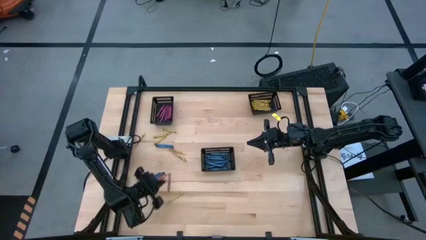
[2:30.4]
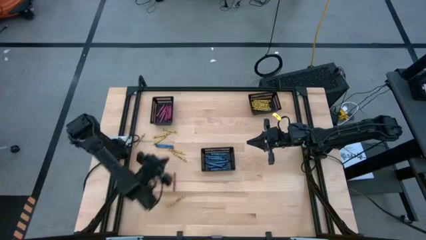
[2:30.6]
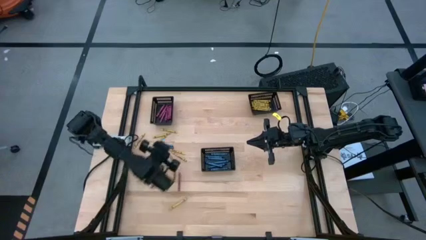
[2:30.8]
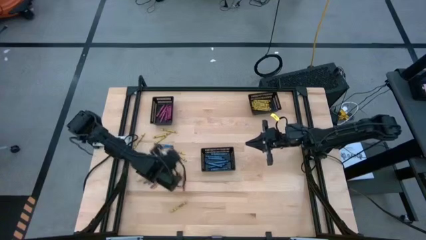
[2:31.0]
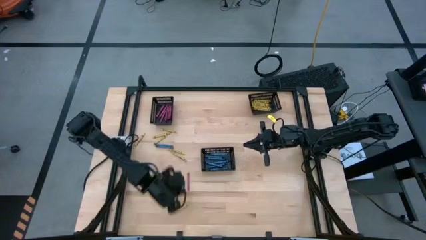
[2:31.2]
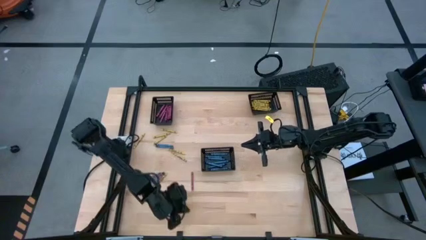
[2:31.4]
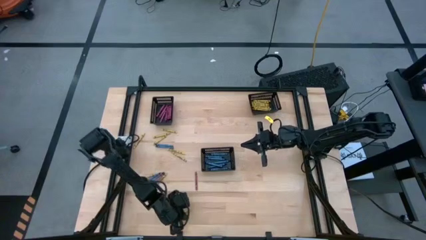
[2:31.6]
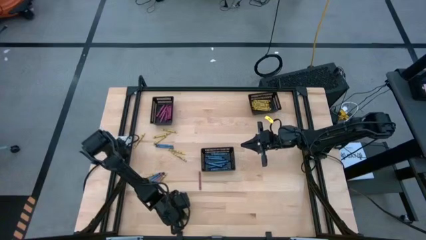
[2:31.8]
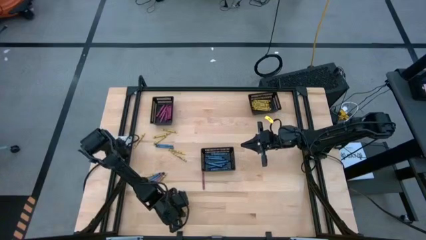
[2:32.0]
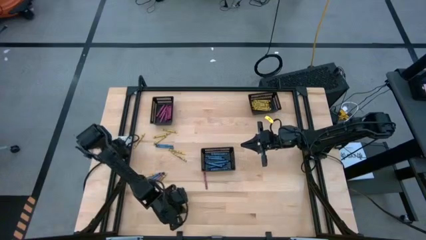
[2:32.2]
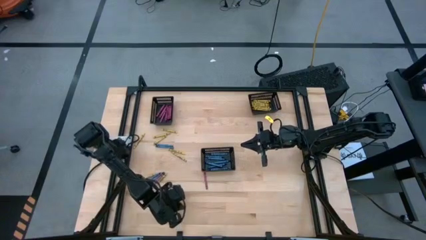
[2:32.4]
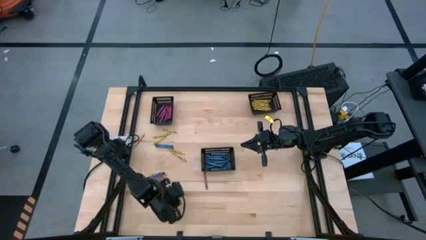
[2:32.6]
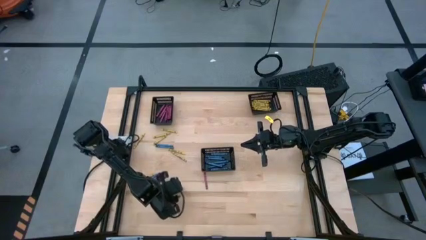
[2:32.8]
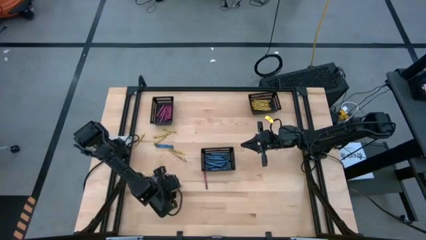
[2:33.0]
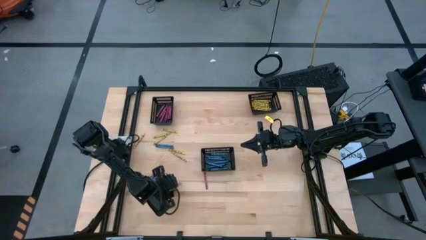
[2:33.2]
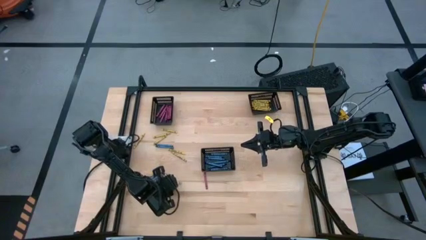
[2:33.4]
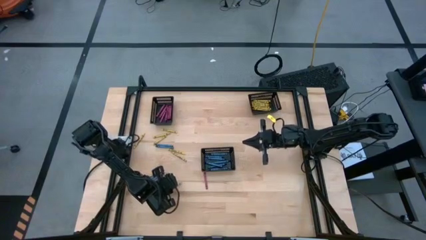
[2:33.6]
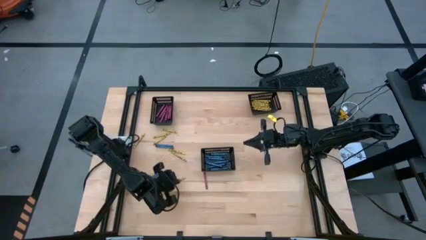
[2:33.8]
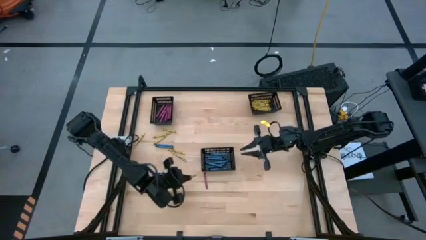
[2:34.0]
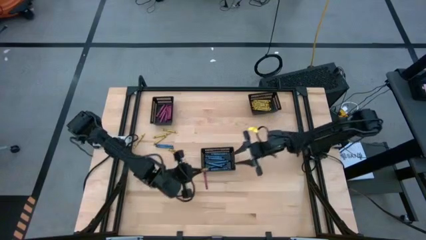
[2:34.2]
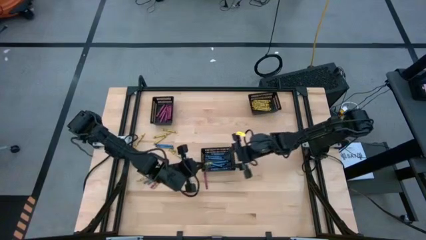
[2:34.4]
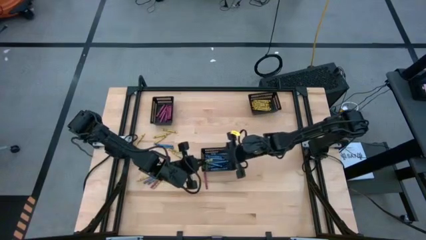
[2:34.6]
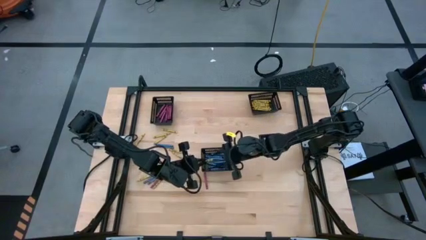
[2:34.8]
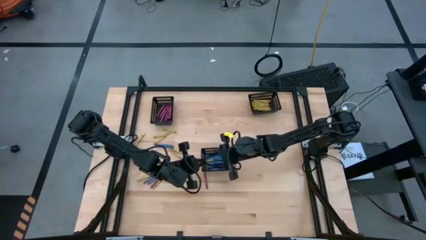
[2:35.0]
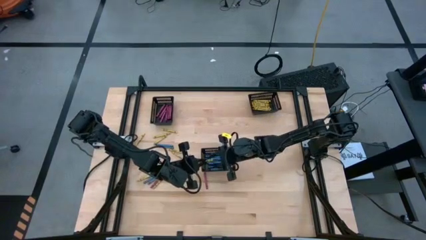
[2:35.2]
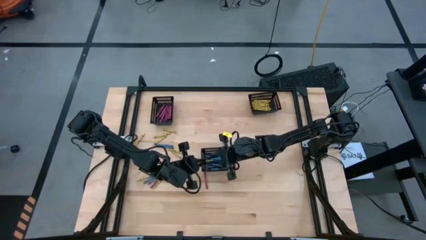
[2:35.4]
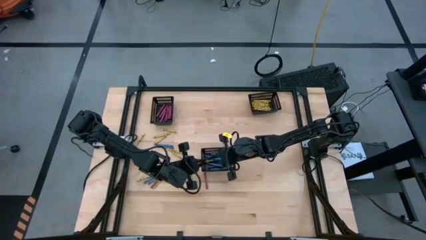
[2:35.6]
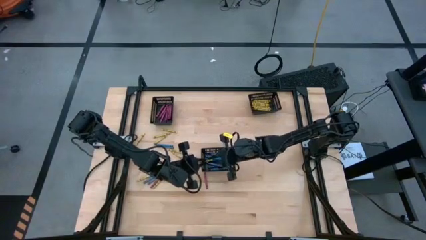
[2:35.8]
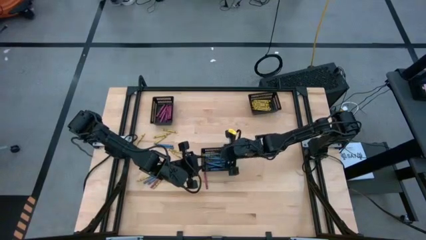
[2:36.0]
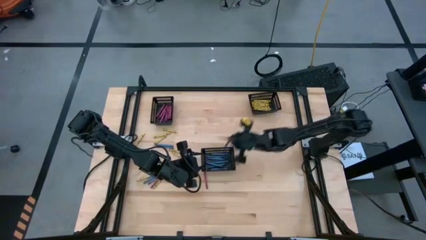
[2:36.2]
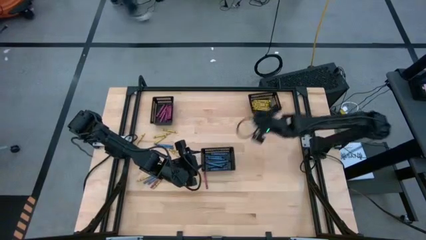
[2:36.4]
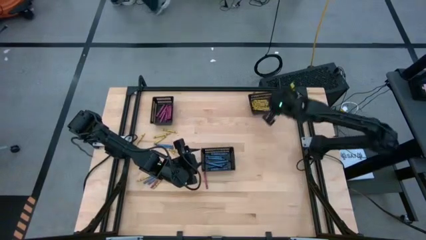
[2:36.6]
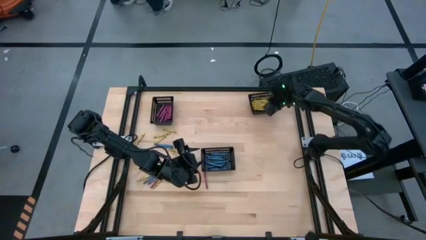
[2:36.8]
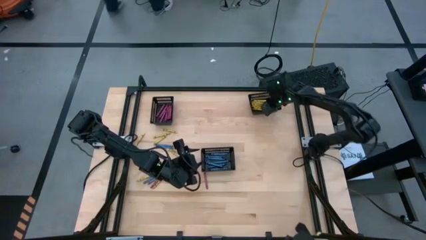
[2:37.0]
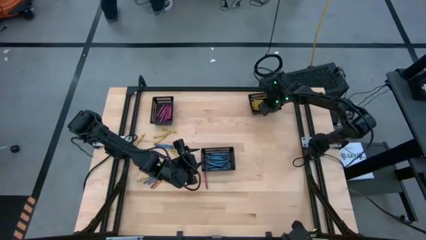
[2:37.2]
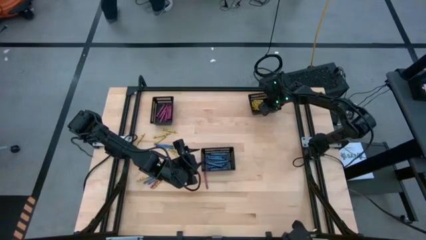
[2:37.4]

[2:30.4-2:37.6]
Task: Sort crayons
Put the yellow crayon into the top right black bin

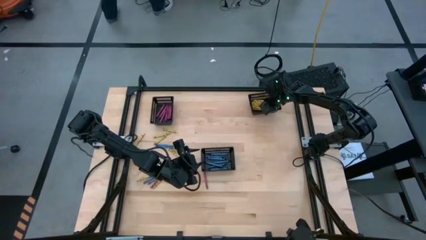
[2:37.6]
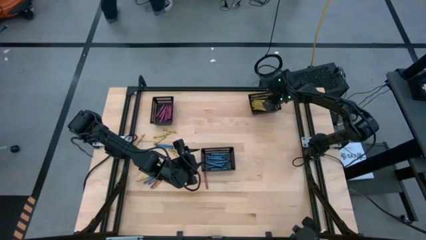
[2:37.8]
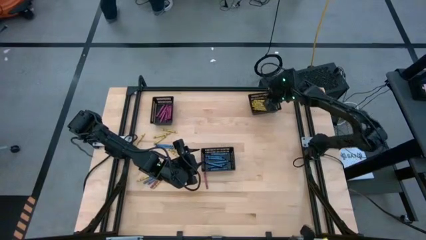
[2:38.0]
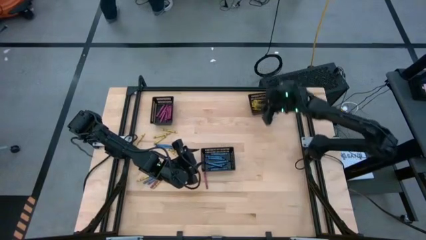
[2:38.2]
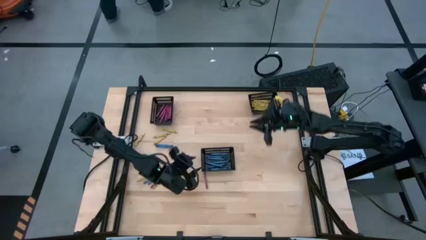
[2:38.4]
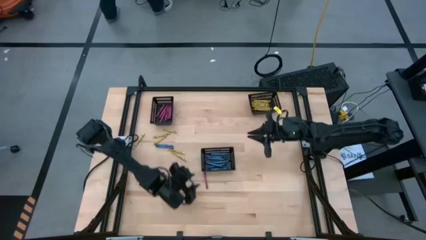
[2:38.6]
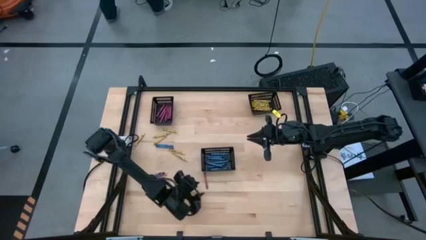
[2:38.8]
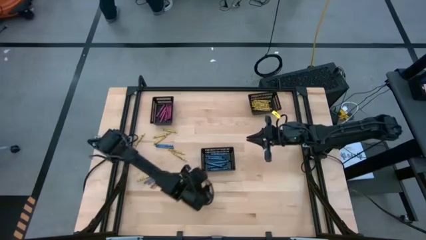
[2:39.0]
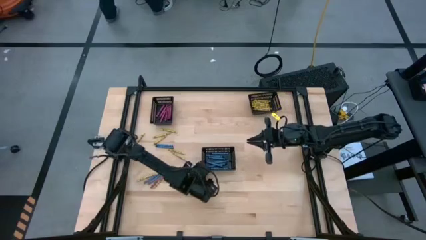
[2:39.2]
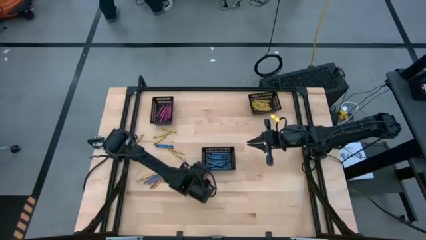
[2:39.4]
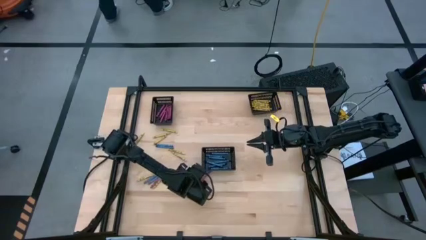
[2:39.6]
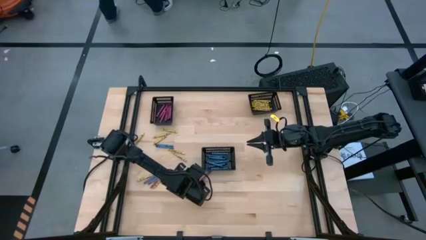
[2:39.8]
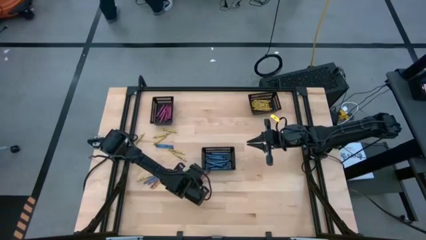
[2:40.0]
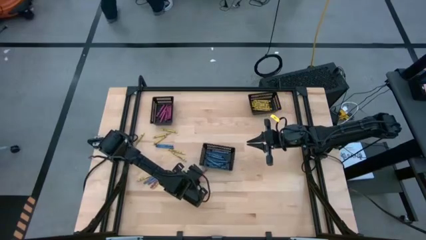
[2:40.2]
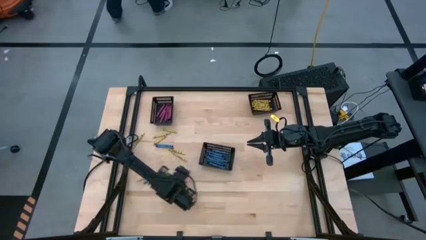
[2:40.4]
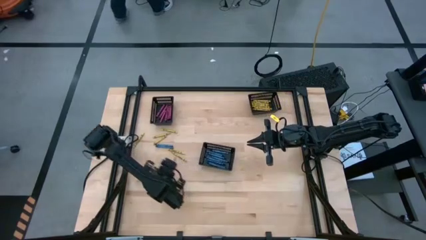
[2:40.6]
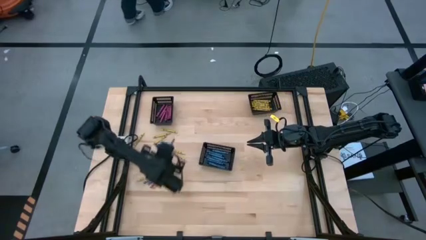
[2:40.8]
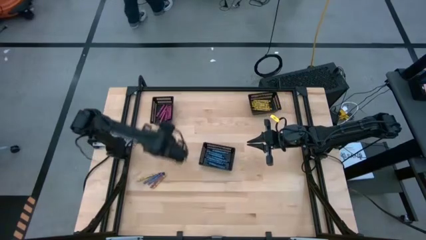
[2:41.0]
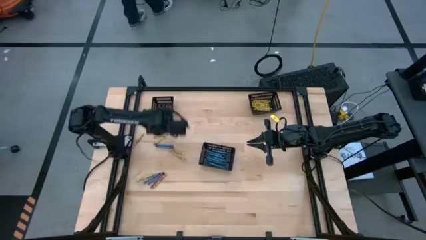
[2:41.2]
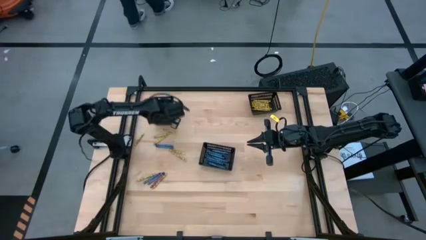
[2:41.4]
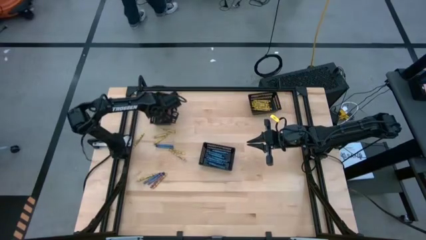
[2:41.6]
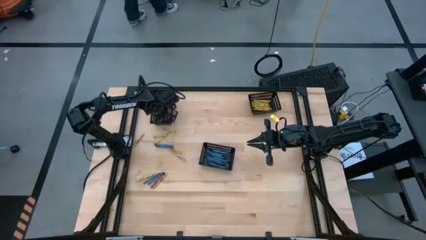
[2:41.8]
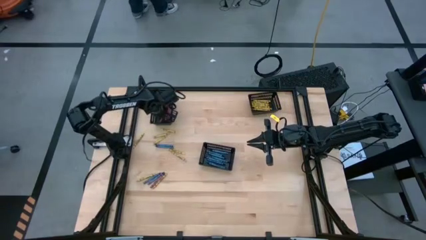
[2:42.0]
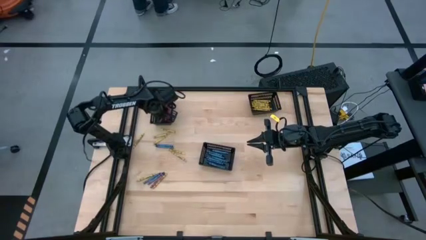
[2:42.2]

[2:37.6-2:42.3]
Put the pink crayon into the top left black bin
